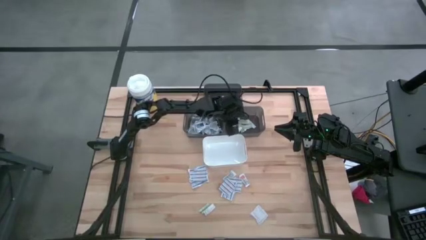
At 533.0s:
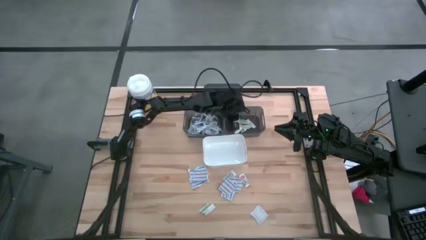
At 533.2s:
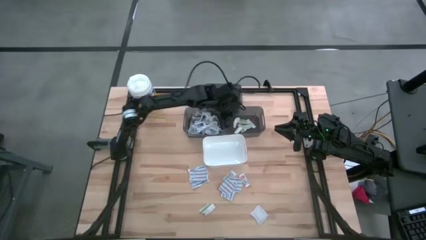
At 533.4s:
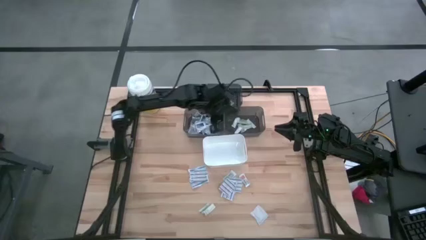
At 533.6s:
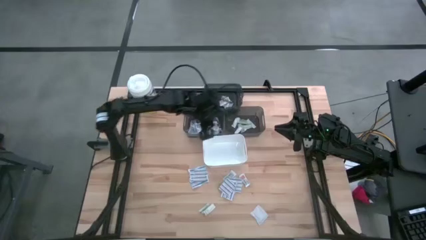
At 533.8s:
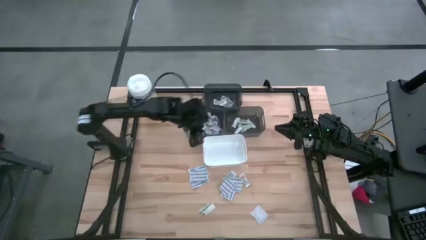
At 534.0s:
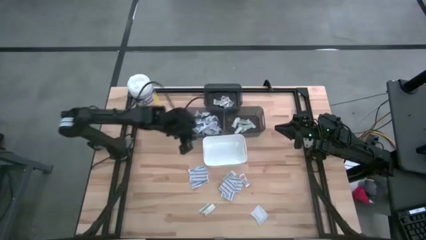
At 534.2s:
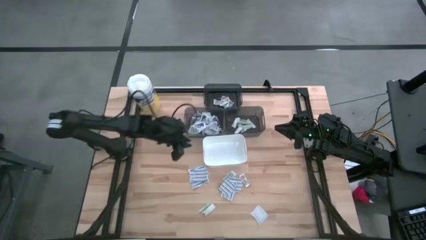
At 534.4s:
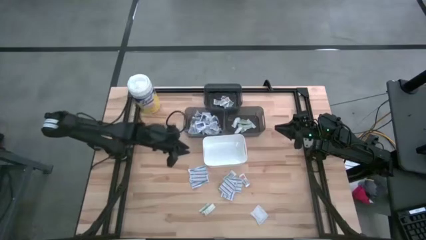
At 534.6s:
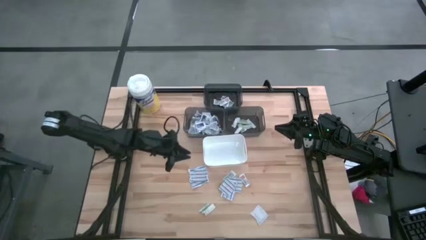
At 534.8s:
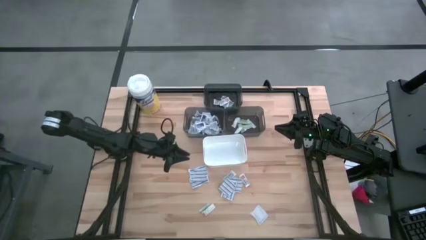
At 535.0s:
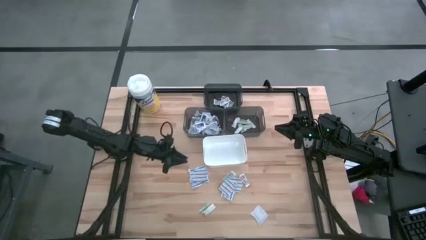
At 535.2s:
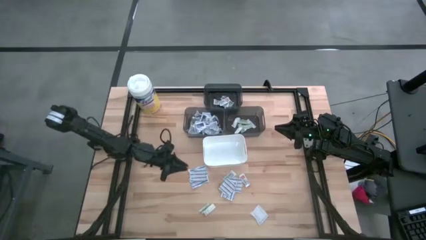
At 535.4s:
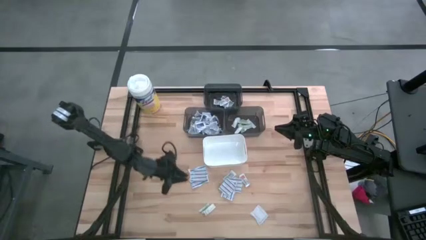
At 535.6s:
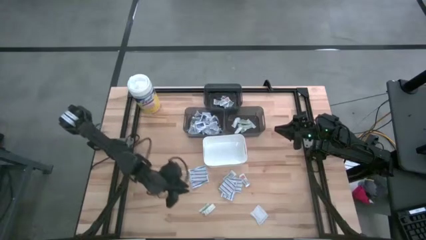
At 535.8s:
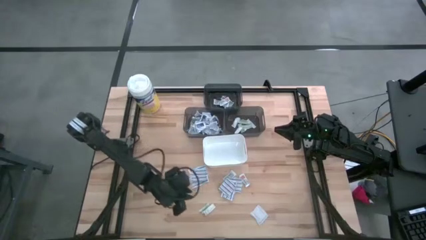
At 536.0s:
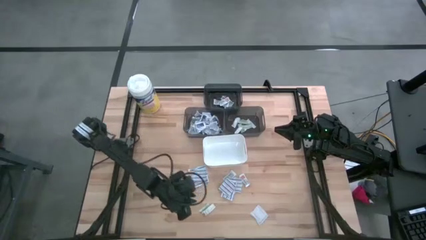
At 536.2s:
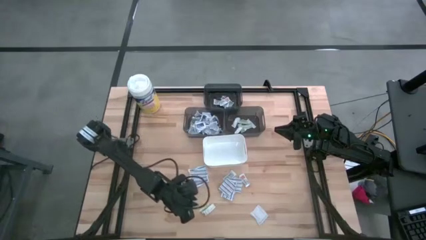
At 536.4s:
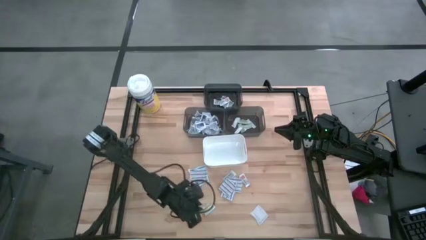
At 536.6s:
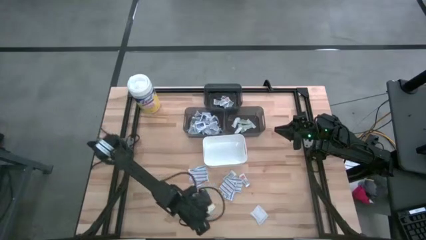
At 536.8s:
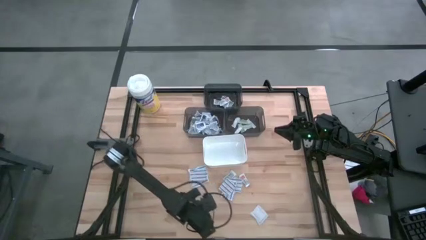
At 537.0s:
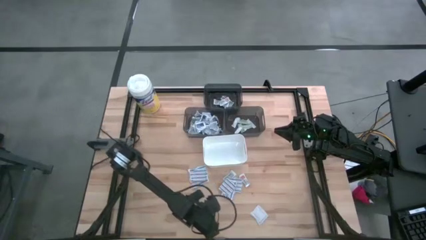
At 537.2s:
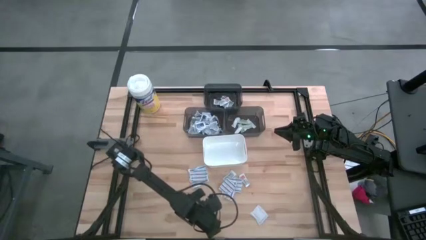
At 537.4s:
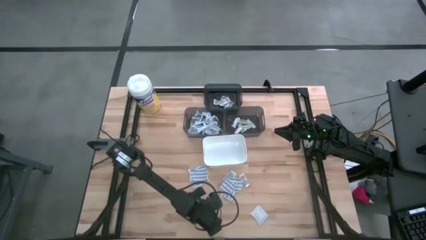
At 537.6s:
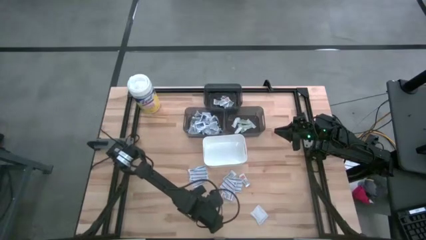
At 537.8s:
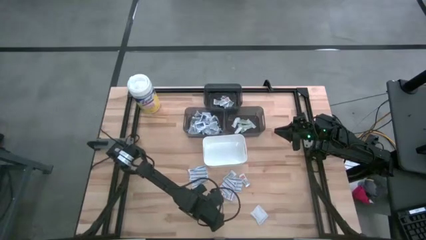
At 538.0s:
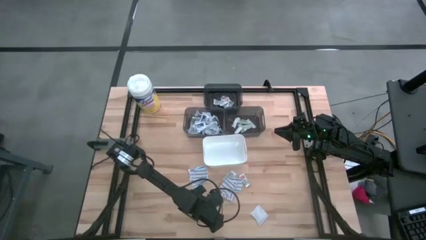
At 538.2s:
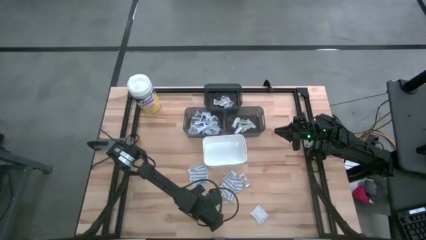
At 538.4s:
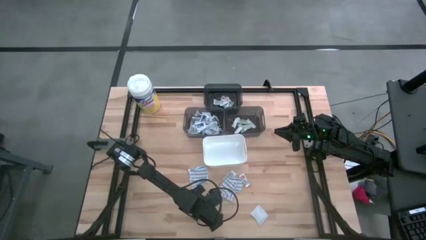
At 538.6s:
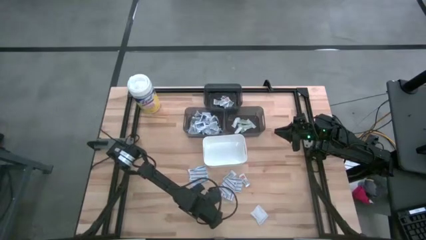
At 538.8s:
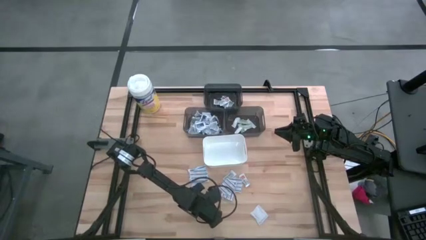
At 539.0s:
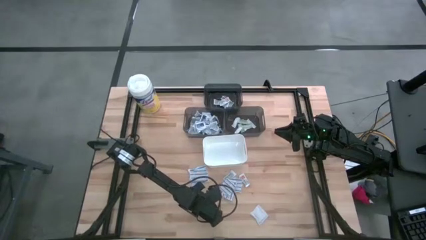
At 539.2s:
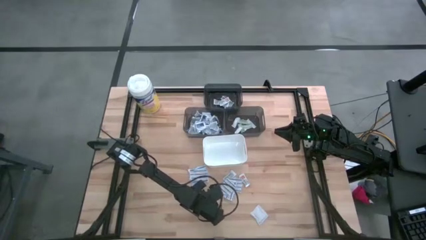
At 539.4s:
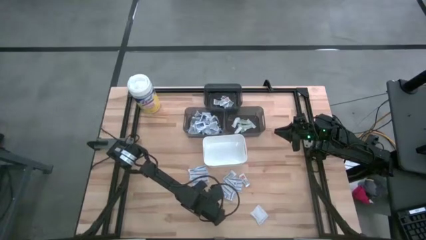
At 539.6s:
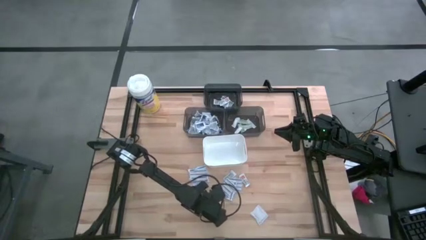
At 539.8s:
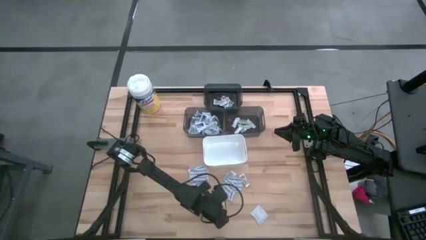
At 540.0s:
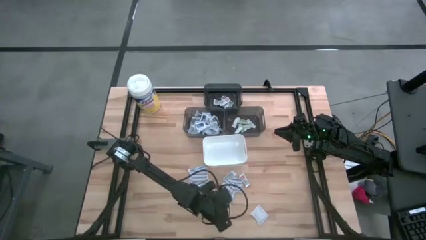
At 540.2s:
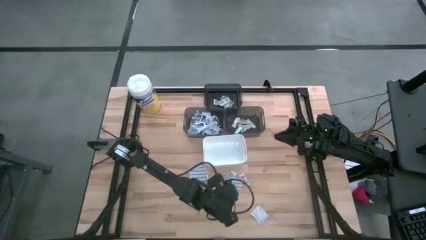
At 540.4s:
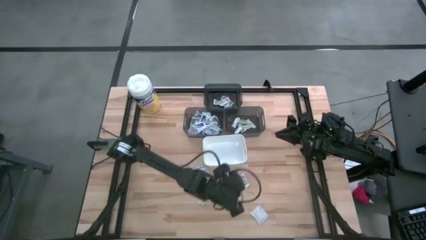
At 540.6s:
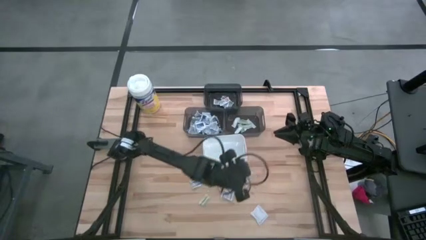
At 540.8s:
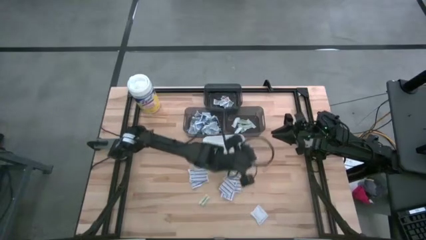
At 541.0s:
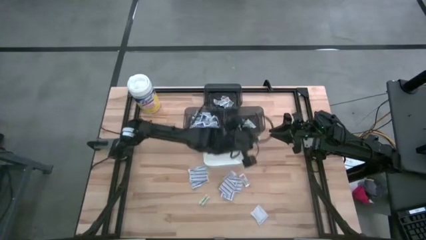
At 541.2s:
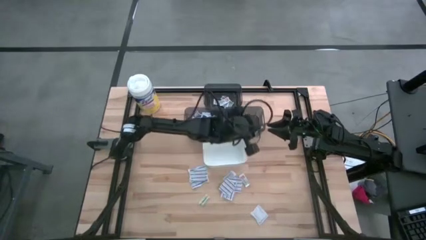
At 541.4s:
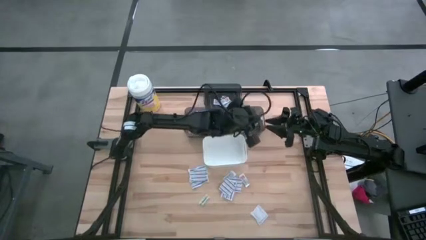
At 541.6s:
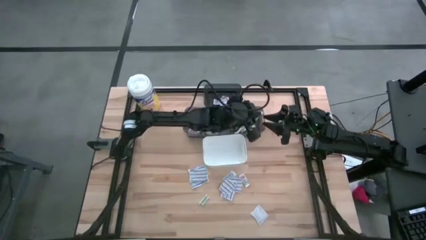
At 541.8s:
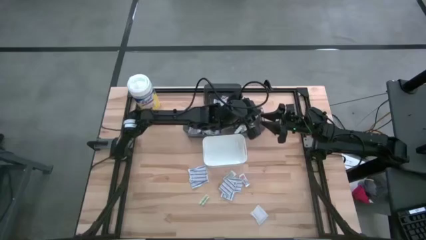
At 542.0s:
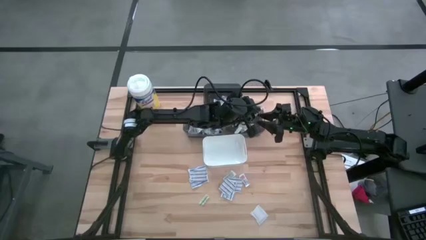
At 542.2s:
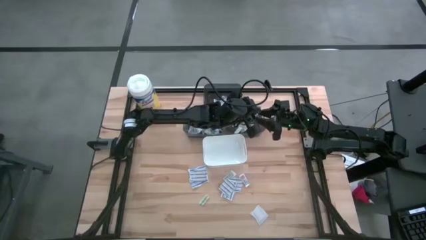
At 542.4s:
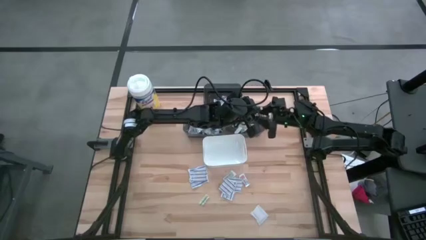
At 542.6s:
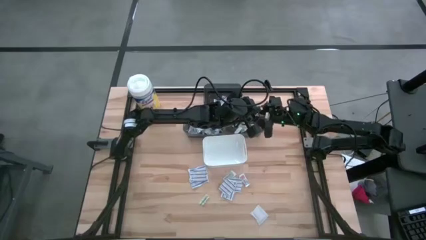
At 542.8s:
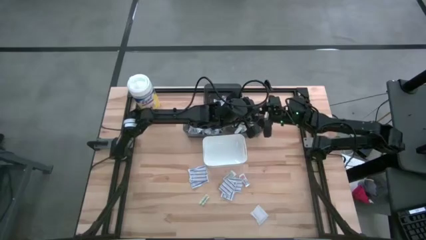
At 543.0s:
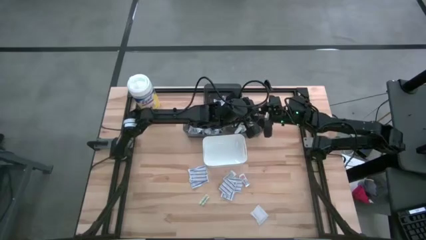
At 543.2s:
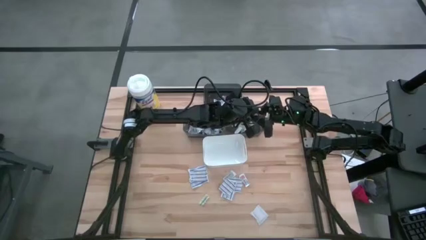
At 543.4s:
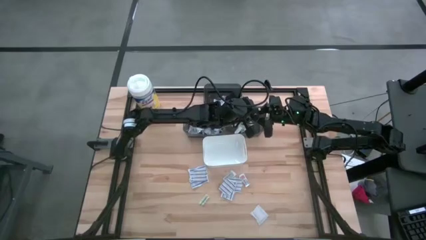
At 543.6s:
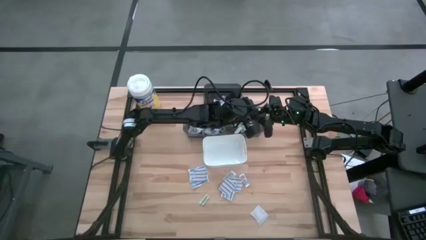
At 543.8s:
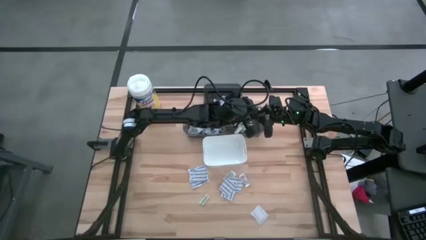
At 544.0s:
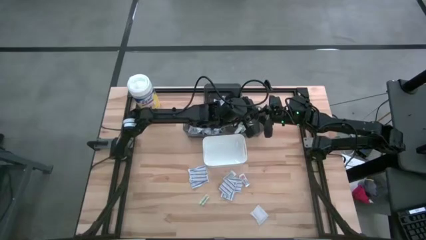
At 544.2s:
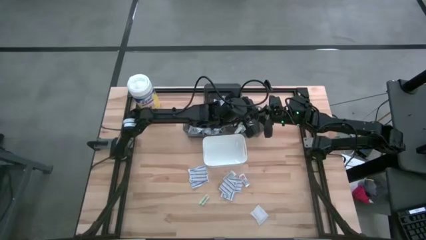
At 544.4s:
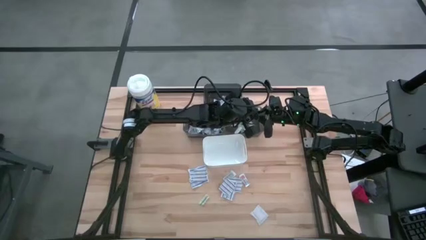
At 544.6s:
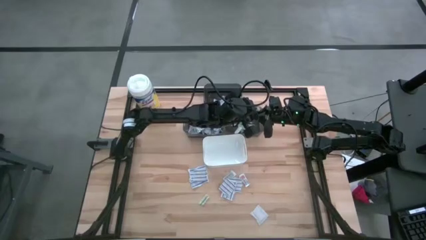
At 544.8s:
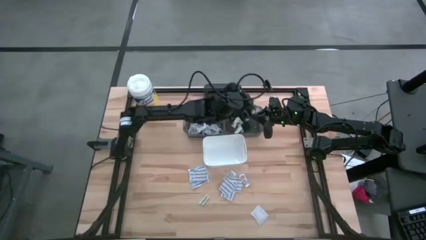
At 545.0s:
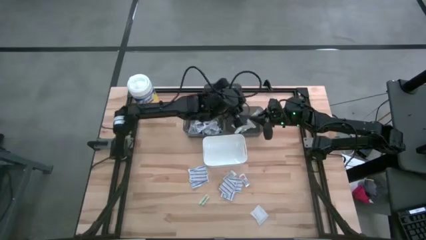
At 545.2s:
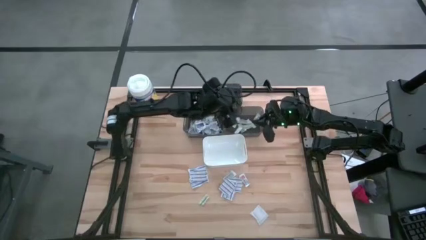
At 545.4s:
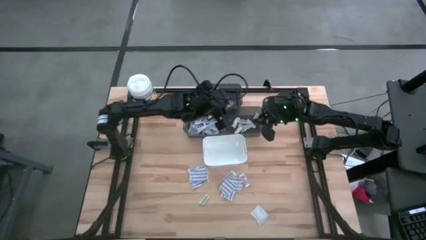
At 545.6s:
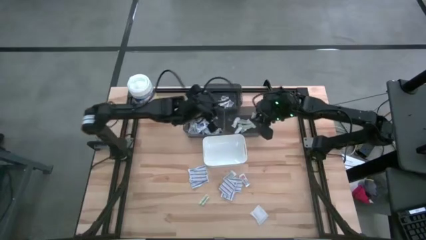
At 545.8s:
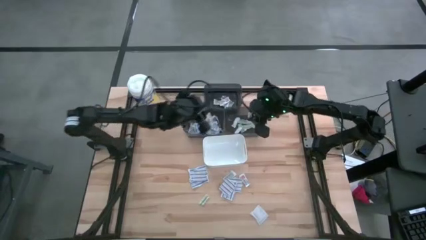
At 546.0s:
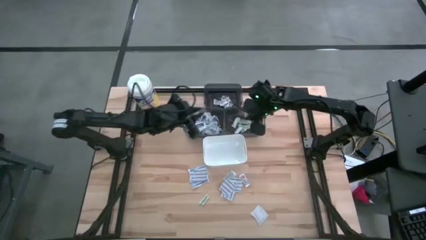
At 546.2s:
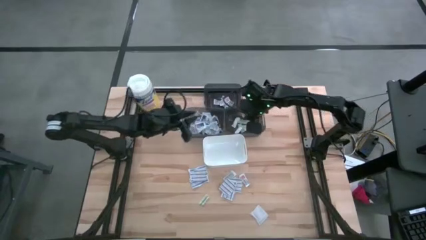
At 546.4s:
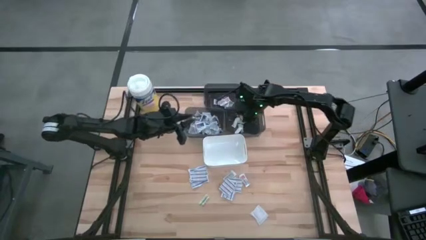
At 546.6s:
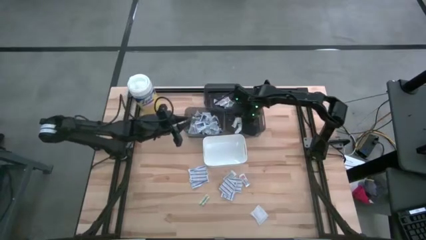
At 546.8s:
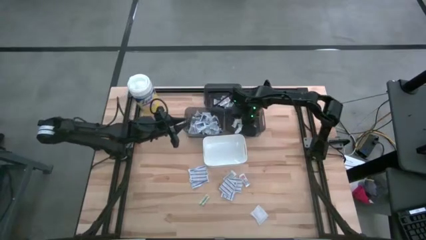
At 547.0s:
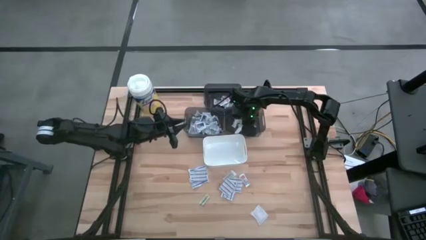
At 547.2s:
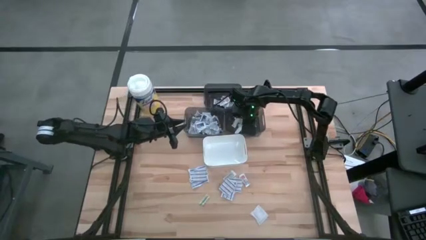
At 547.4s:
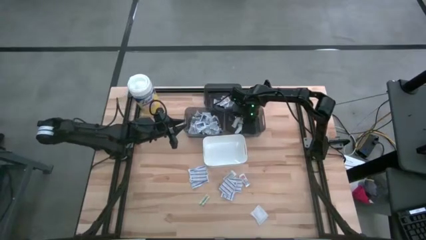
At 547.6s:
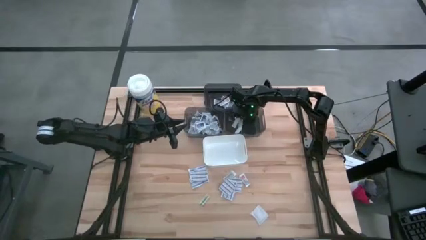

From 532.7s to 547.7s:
Task: Pick & Place First Aid Supplies
Put the green bandage into the bottom right black bin

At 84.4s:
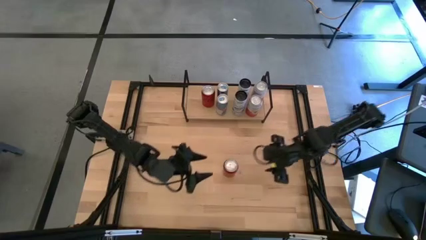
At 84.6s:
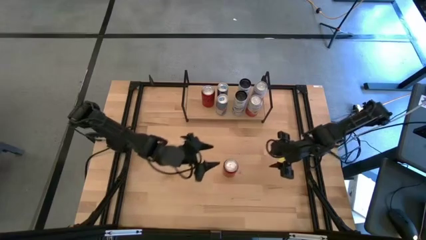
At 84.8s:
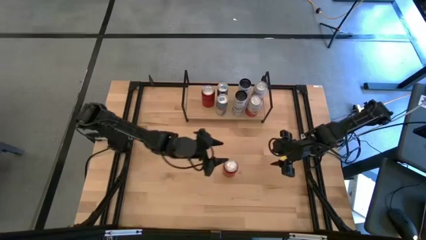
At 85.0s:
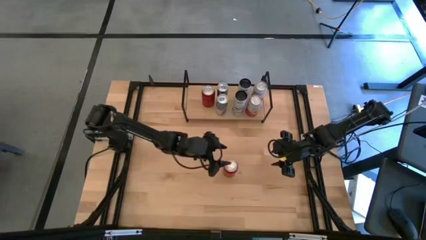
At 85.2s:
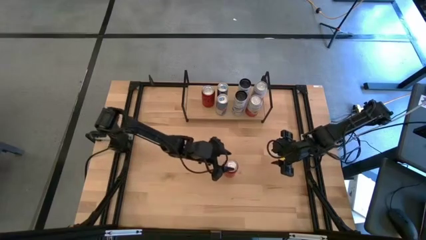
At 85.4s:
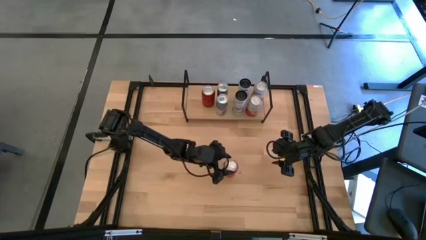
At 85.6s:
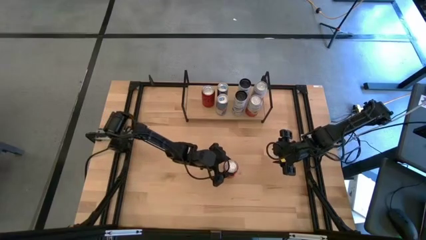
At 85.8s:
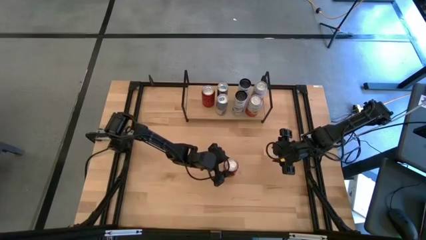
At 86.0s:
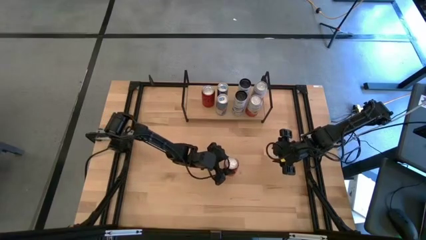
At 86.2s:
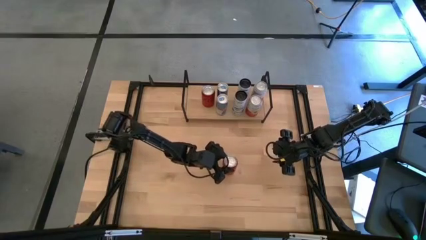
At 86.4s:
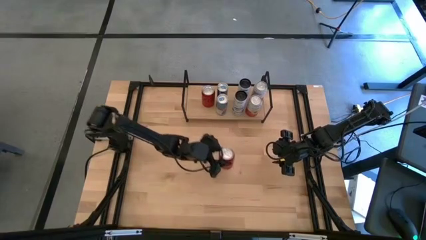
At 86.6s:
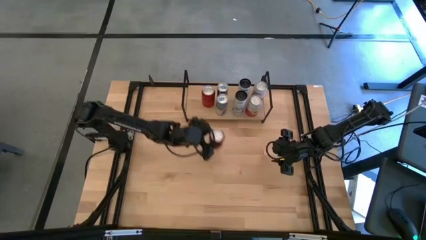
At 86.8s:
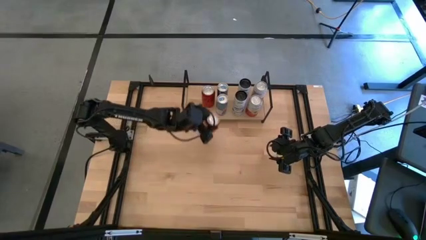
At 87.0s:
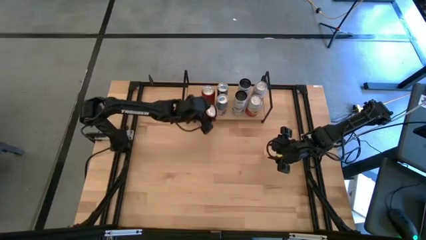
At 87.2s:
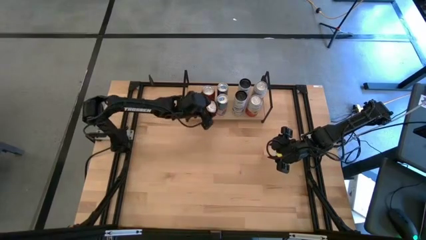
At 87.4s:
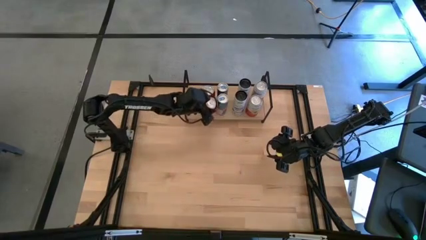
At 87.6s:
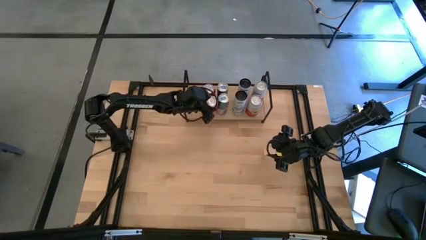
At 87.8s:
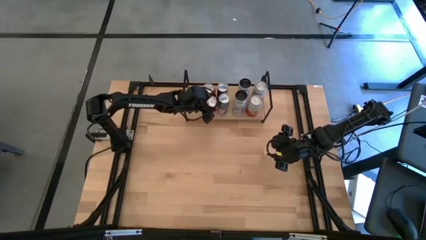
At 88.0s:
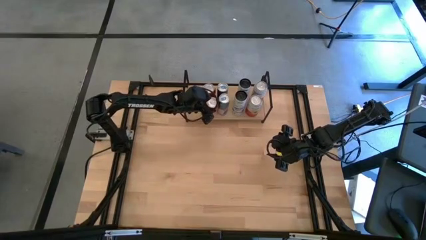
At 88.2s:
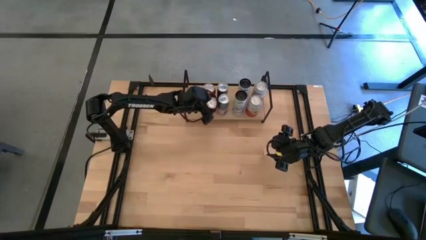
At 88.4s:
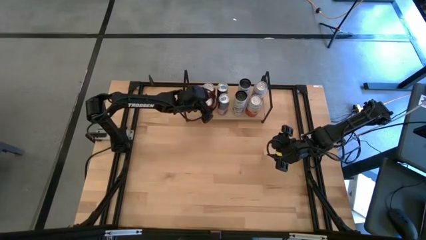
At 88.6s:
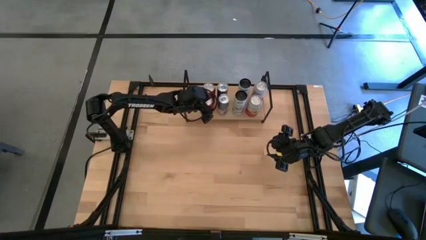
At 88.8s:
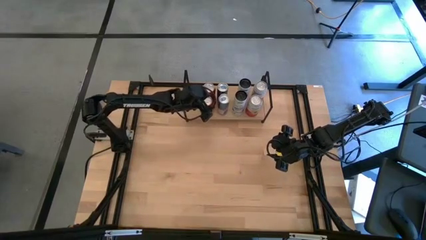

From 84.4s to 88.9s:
Task: Place canned beverage on shelf
Align the red and black soda can with the other red and black soda can on the shelf
